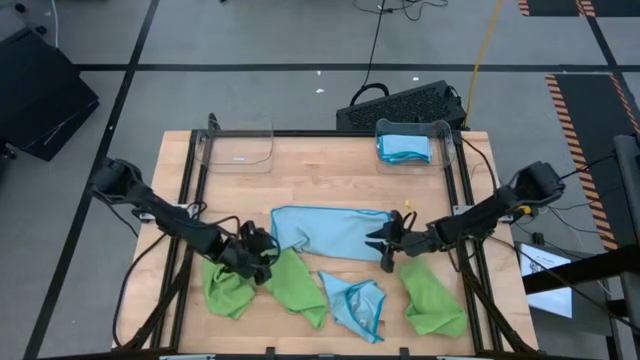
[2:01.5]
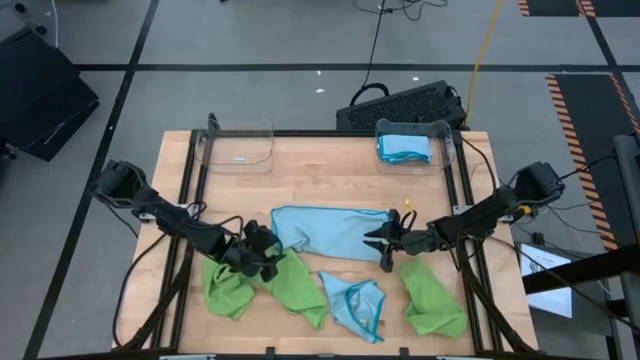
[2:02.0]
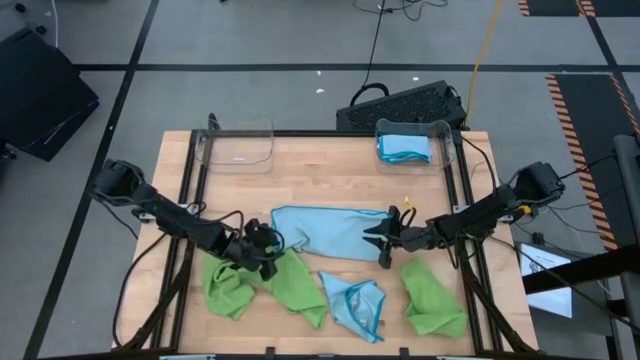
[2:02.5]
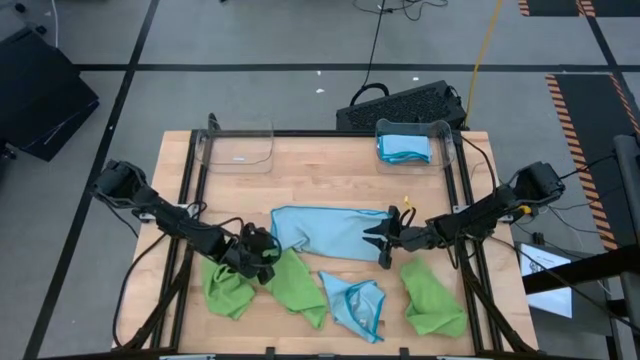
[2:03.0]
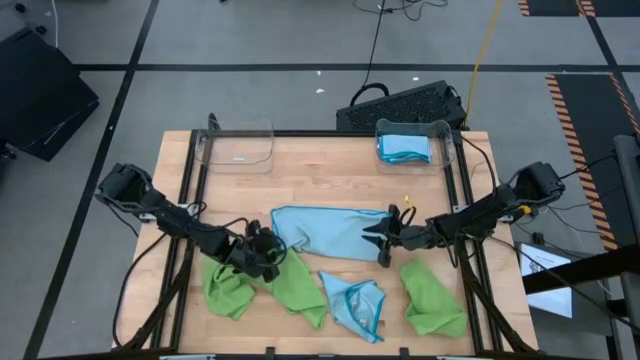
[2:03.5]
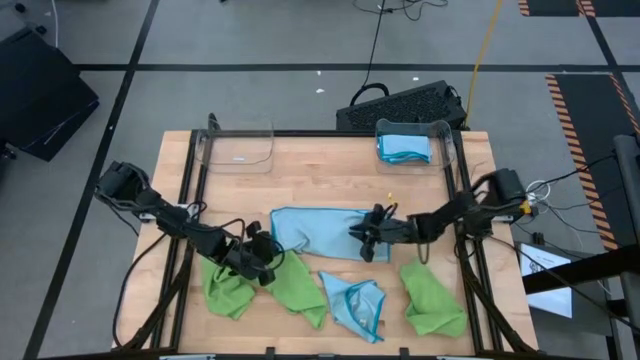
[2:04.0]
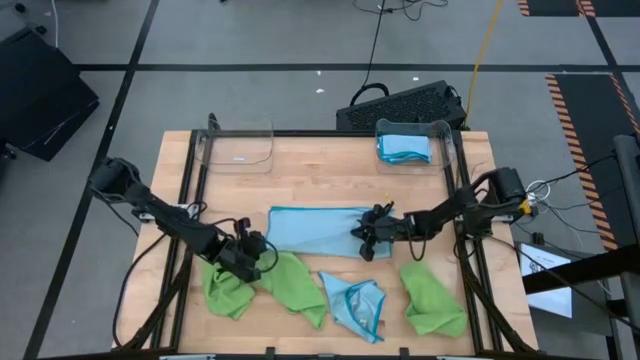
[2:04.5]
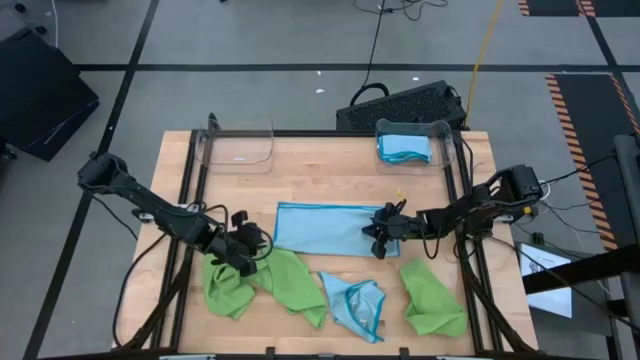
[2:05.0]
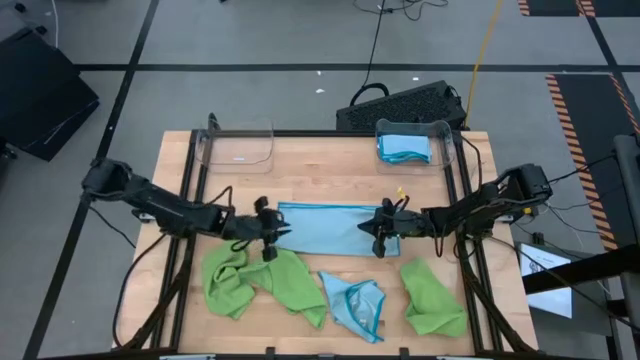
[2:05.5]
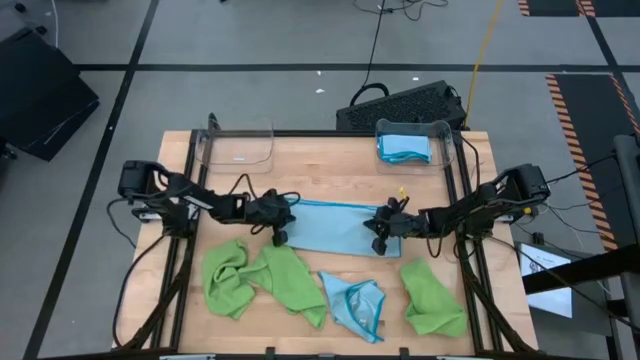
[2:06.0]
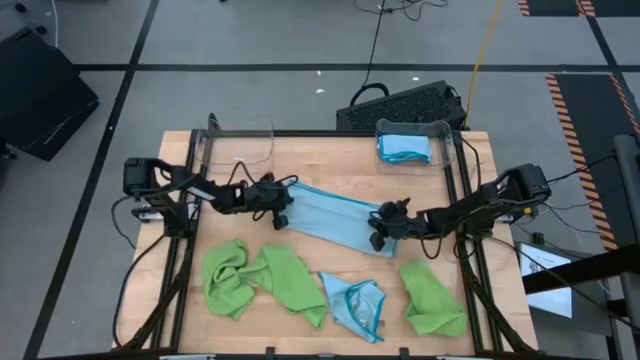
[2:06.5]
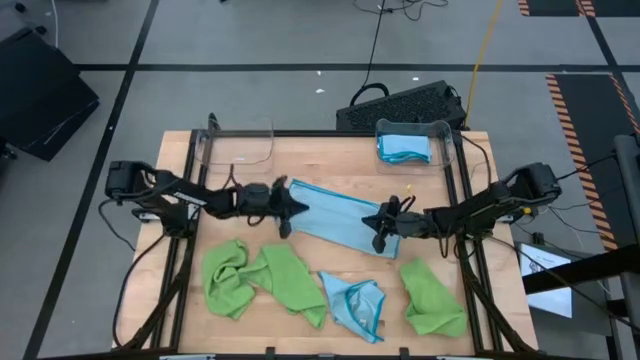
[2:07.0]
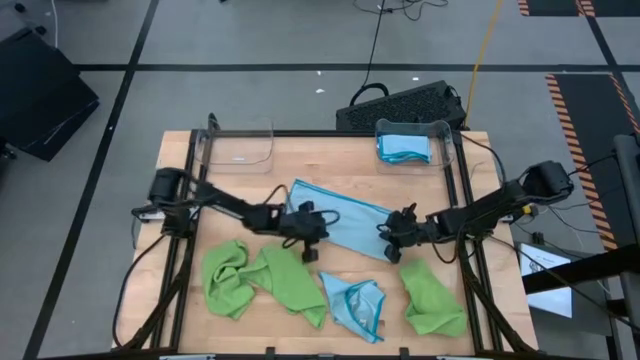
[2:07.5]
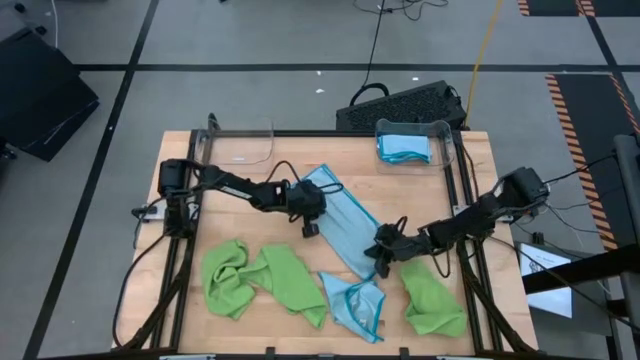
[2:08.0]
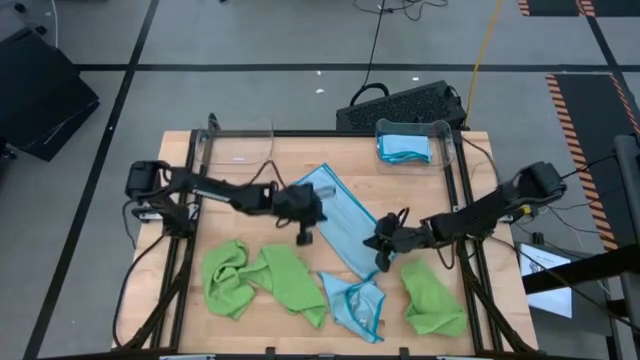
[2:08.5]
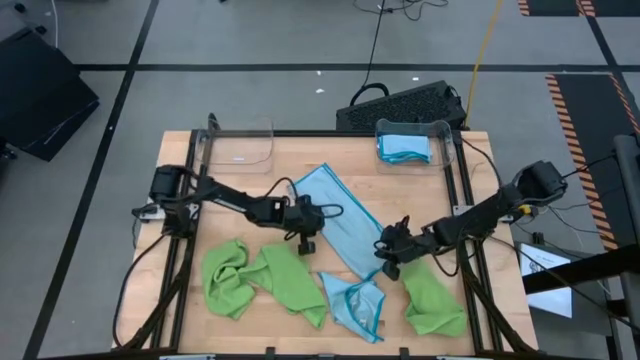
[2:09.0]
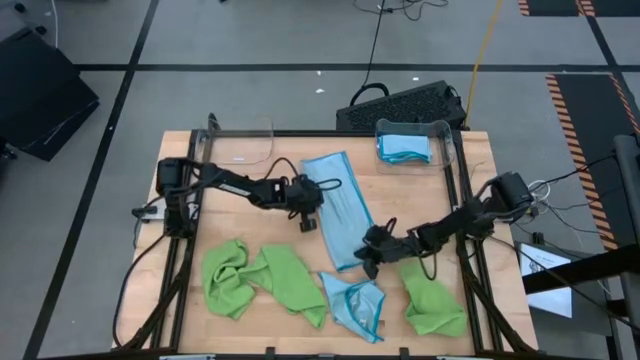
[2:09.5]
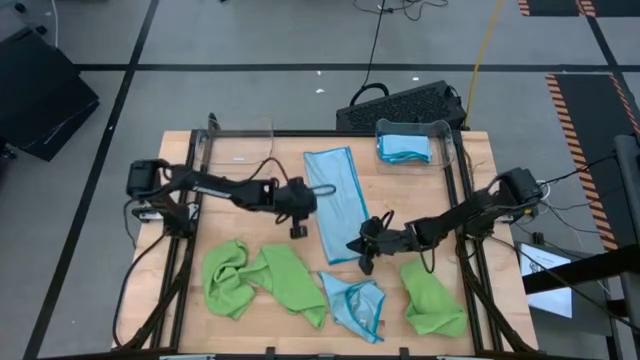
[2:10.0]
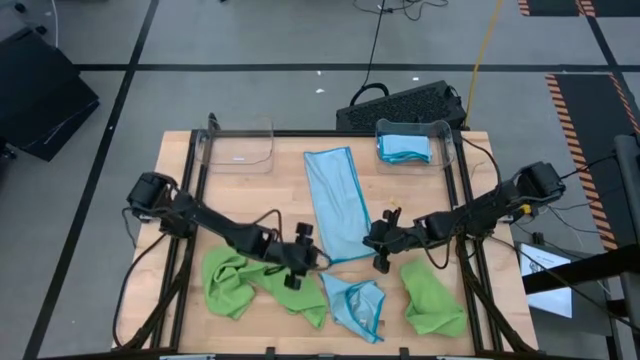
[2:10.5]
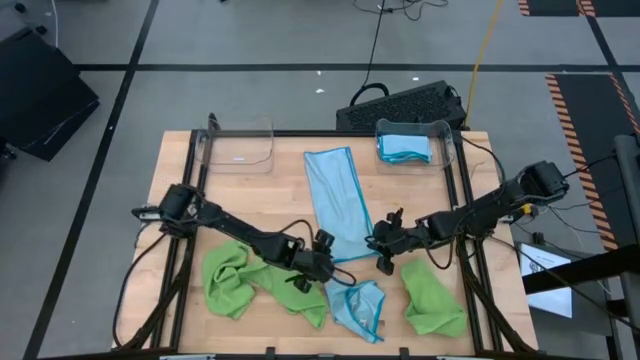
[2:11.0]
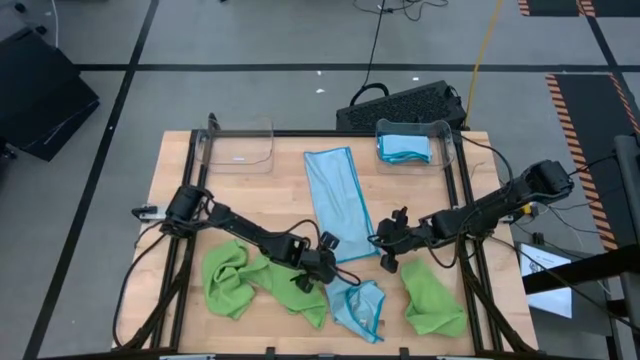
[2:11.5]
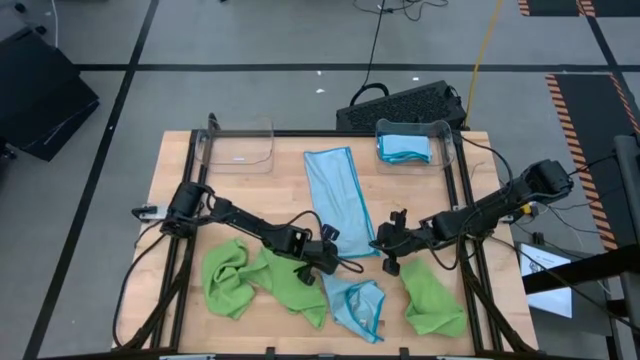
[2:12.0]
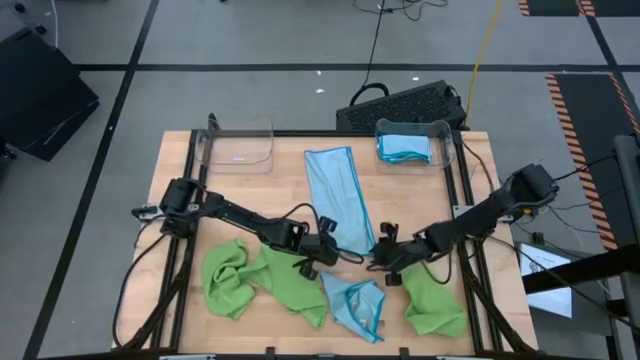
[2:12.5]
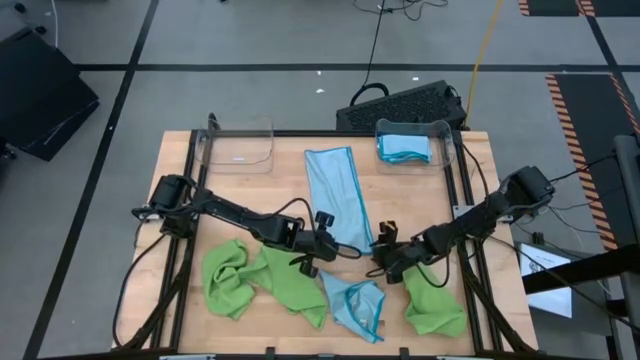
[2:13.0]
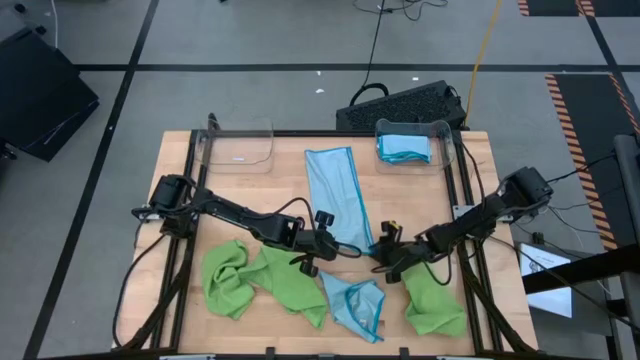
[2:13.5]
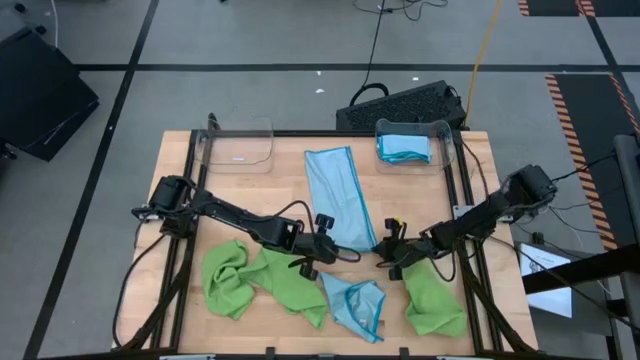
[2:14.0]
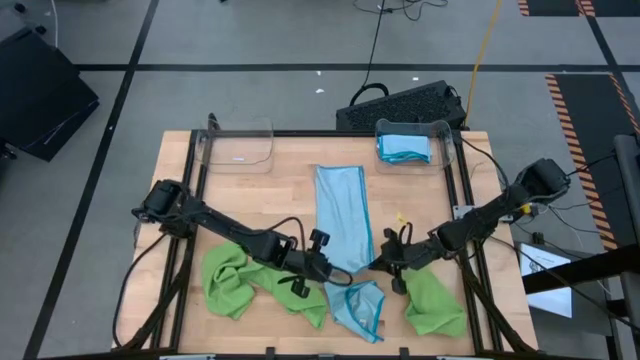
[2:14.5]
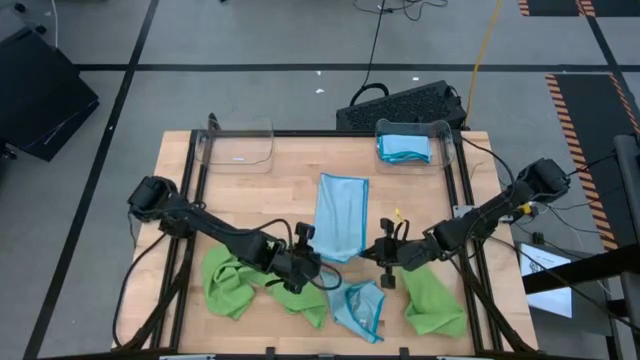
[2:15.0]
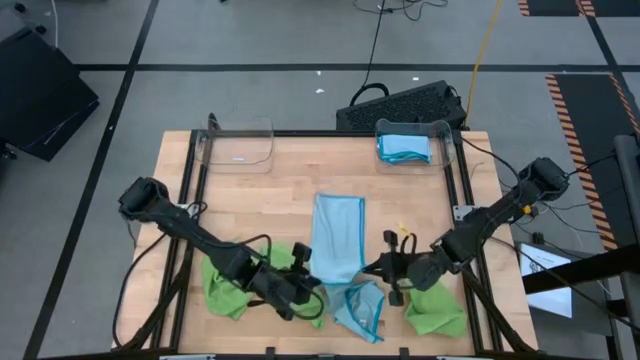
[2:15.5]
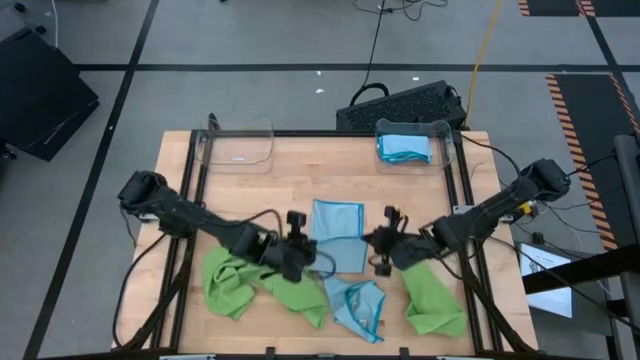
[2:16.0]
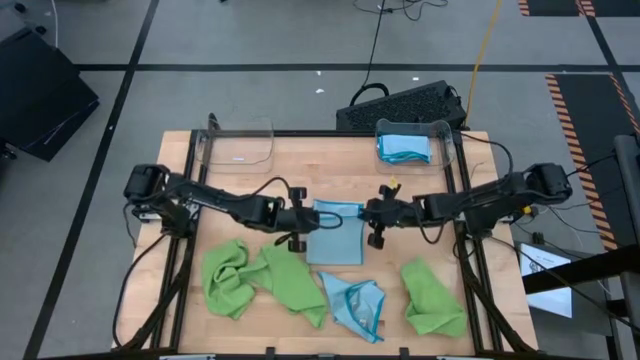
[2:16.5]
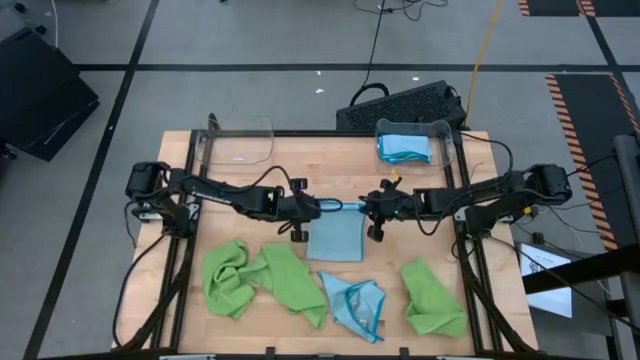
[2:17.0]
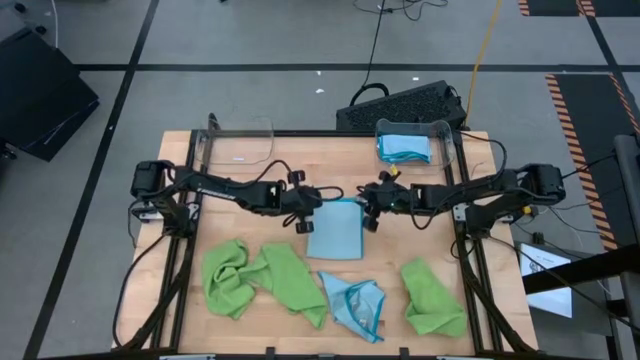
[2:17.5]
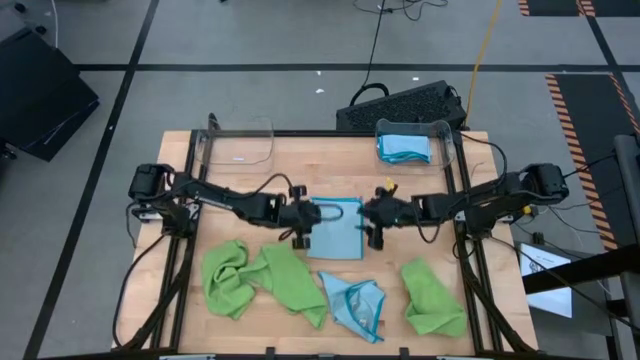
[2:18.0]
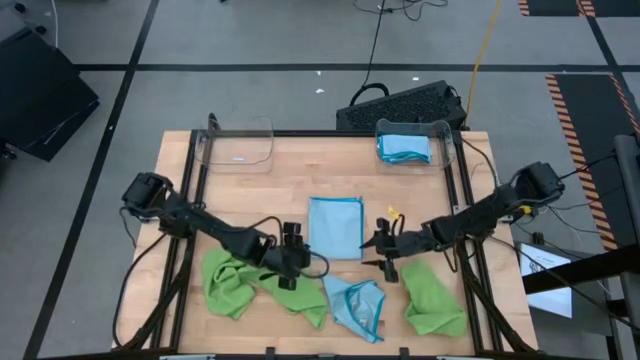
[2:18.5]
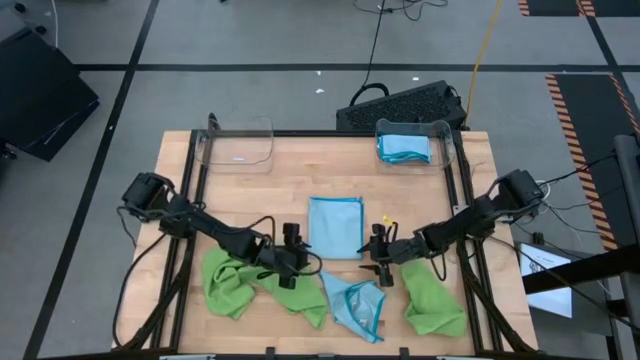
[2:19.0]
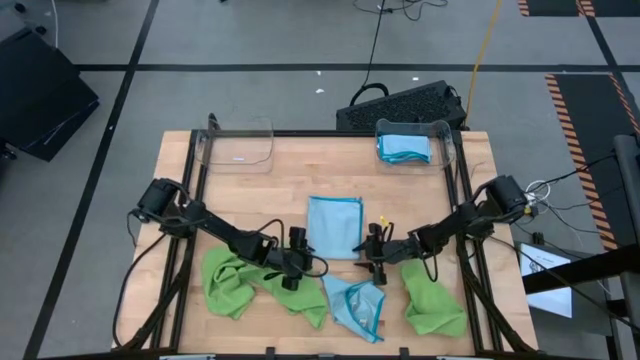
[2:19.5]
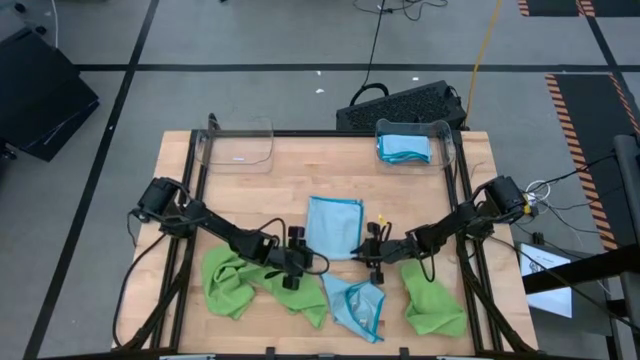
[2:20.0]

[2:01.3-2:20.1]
Task: Fold microfiber towels
Fold the top blue microfiber cloth

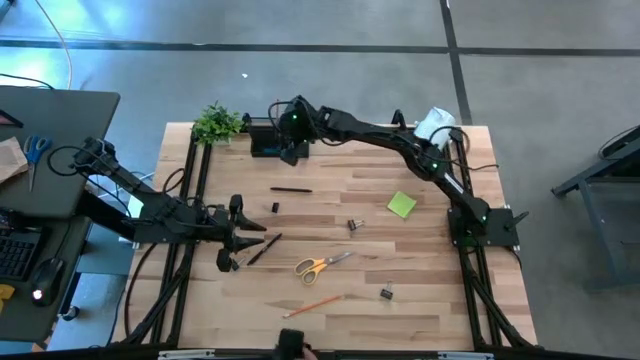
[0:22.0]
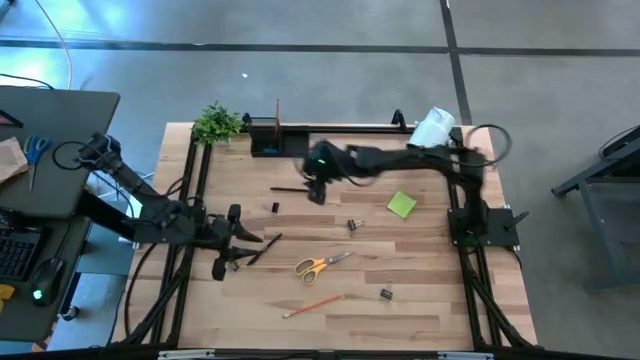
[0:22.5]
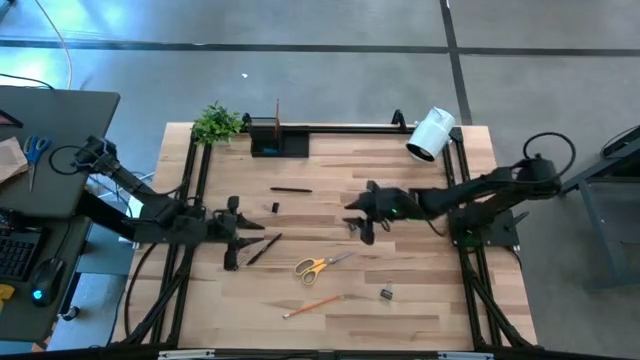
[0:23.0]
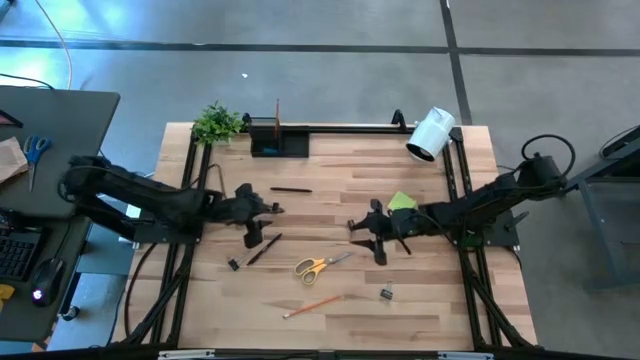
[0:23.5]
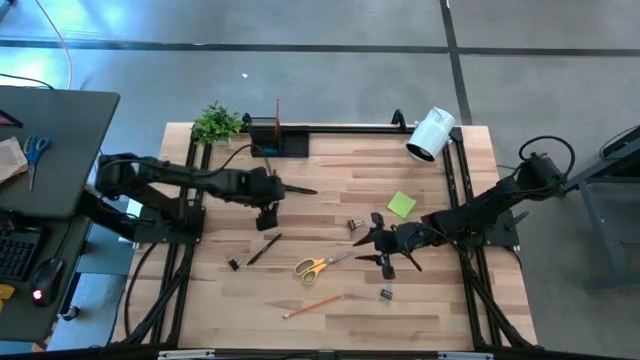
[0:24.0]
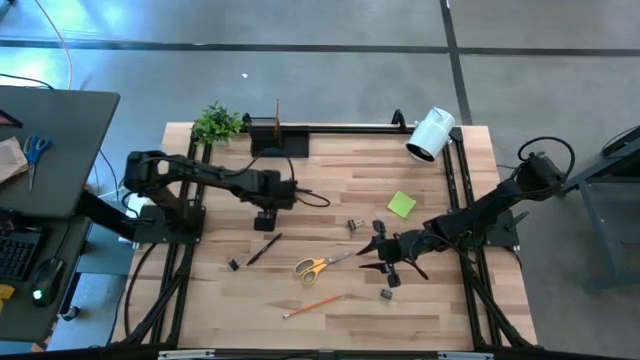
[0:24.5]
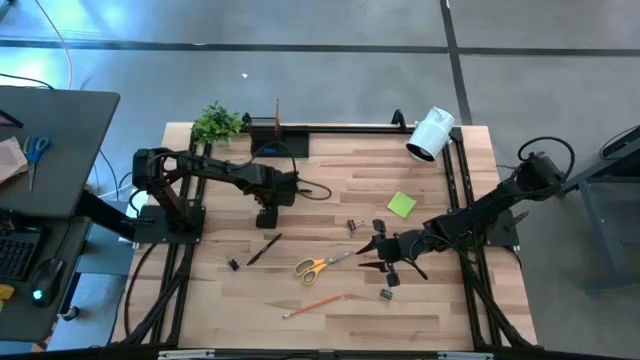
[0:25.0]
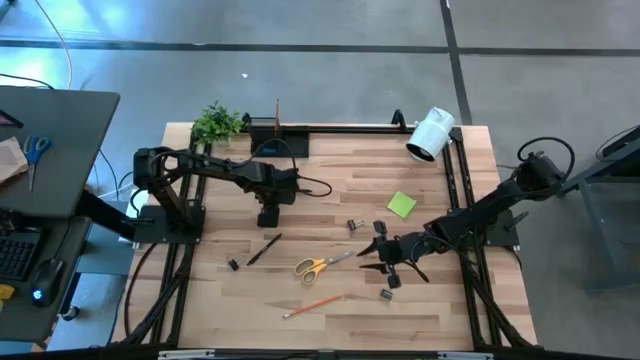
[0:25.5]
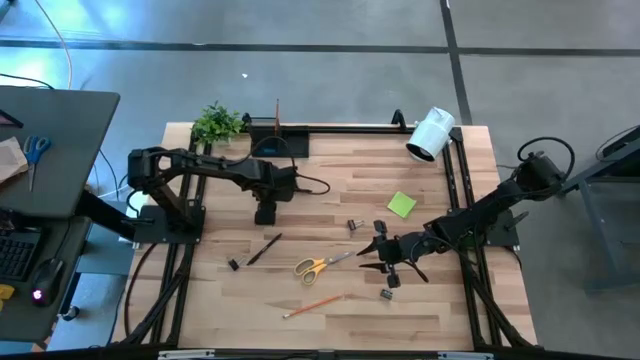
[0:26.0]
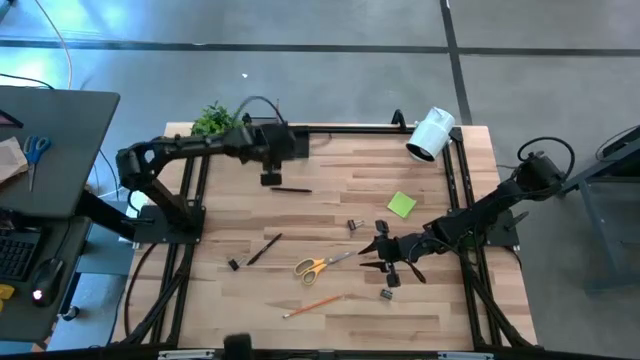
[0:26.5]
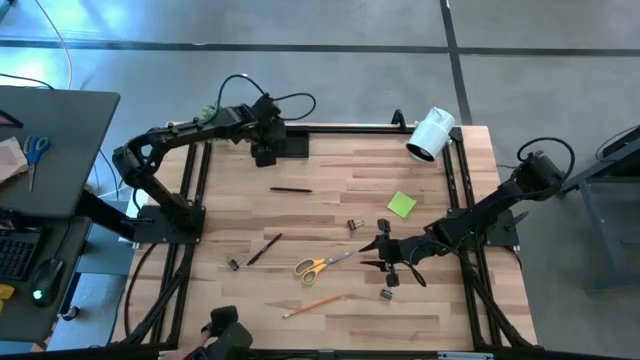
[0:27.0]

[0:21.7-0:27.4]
Task: Pick and place office supplies into organizer
Put the top left black binder clip into the bottom left section of the desk organizer
